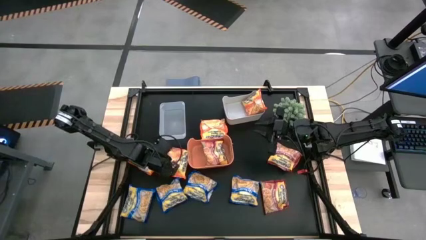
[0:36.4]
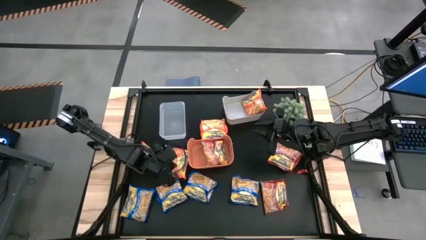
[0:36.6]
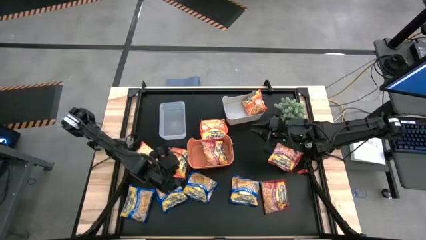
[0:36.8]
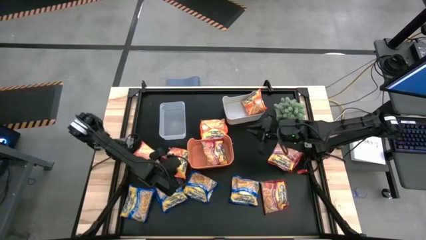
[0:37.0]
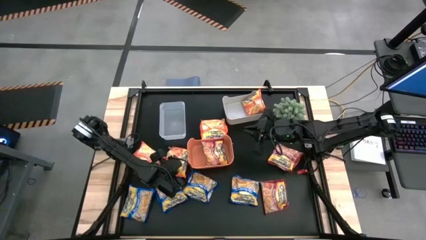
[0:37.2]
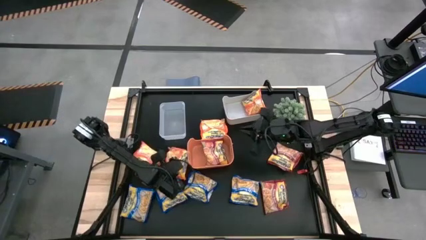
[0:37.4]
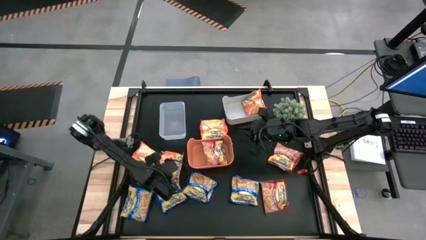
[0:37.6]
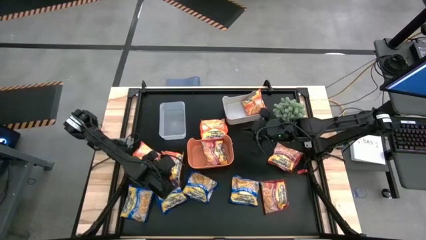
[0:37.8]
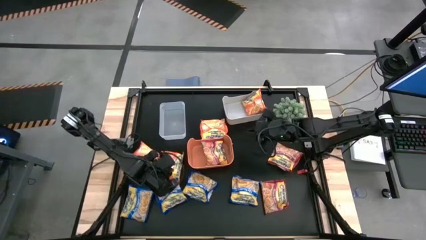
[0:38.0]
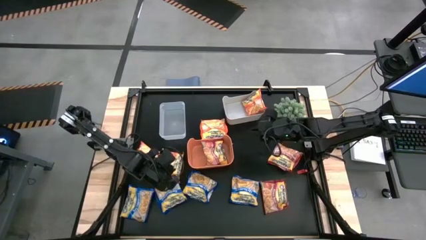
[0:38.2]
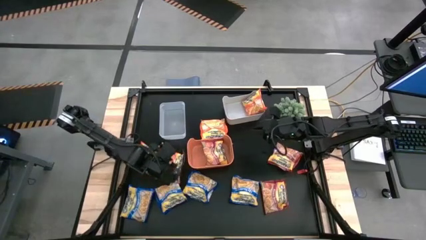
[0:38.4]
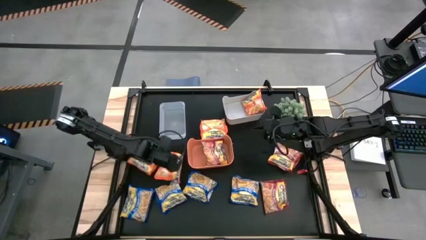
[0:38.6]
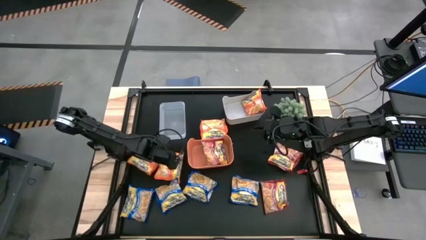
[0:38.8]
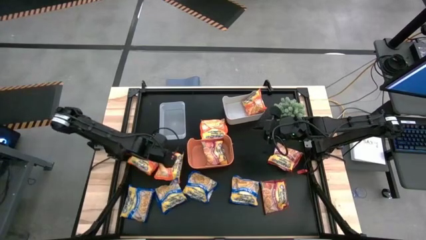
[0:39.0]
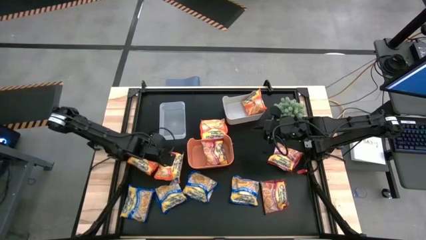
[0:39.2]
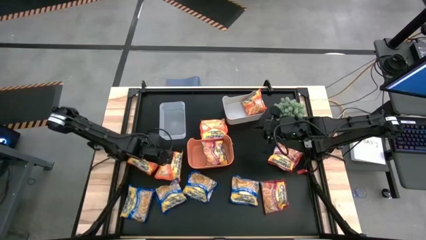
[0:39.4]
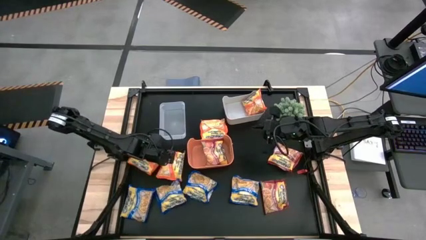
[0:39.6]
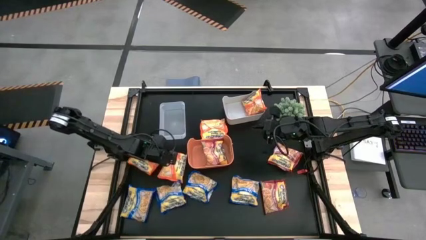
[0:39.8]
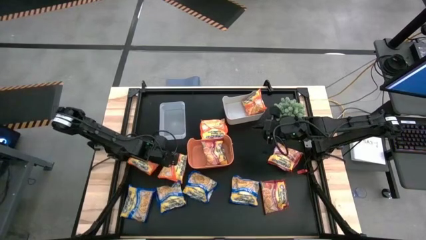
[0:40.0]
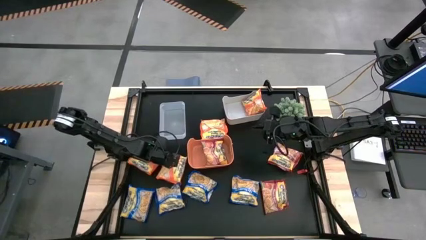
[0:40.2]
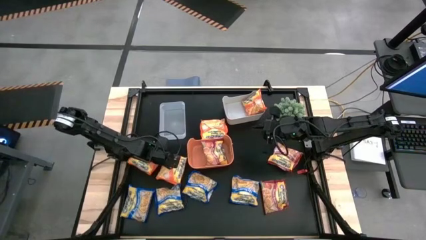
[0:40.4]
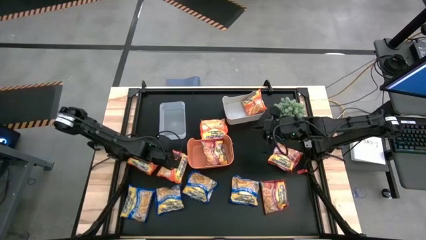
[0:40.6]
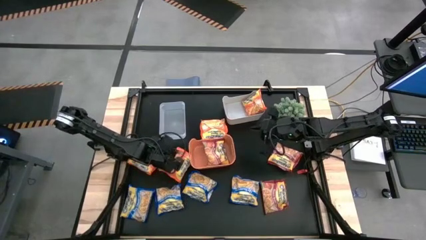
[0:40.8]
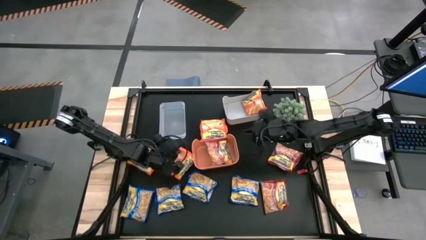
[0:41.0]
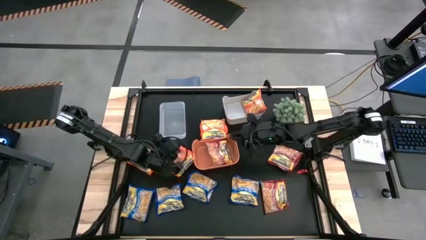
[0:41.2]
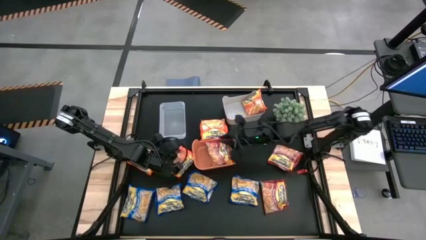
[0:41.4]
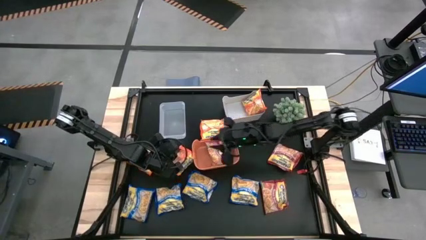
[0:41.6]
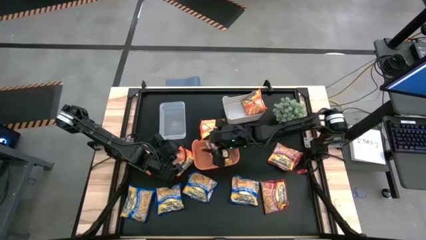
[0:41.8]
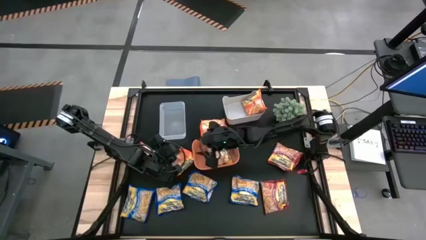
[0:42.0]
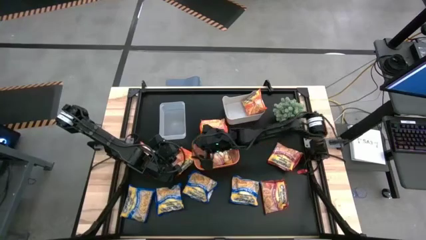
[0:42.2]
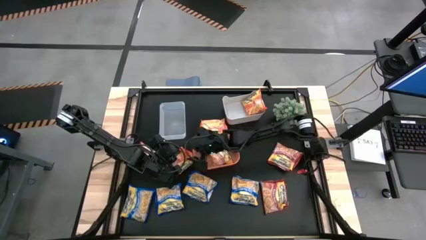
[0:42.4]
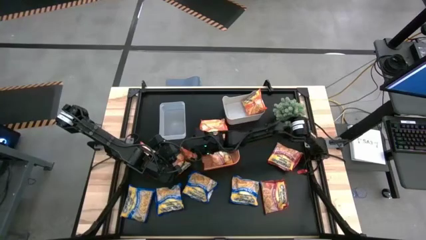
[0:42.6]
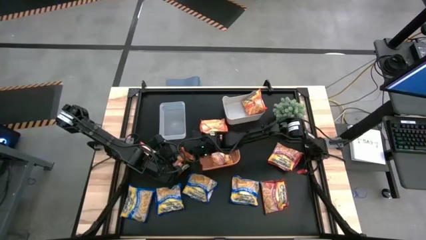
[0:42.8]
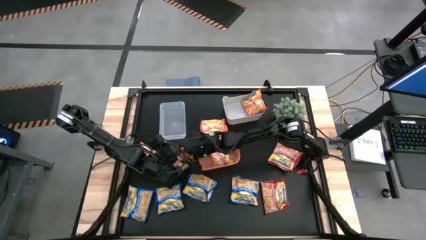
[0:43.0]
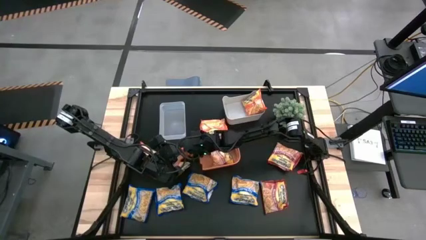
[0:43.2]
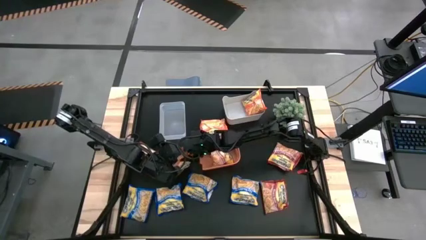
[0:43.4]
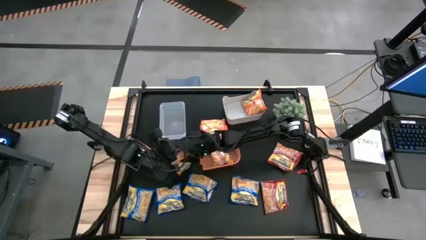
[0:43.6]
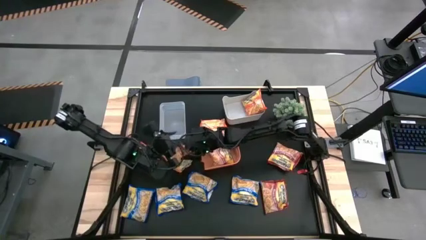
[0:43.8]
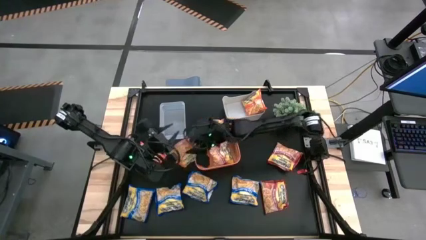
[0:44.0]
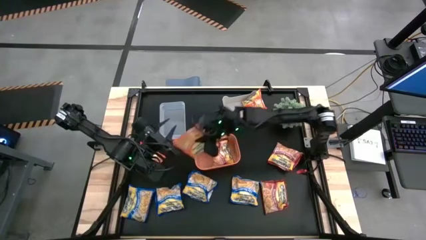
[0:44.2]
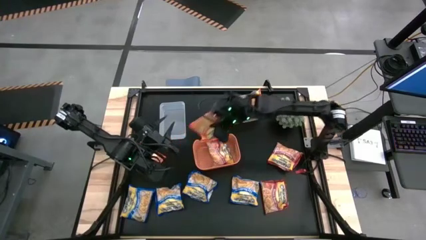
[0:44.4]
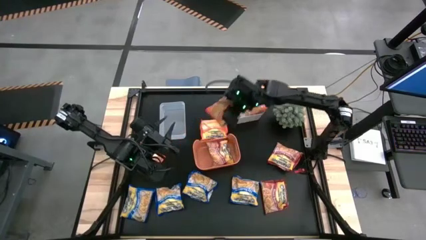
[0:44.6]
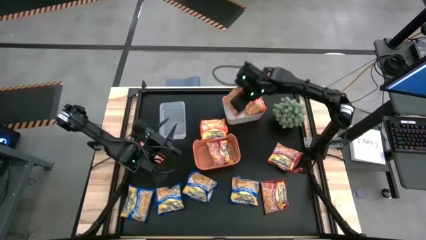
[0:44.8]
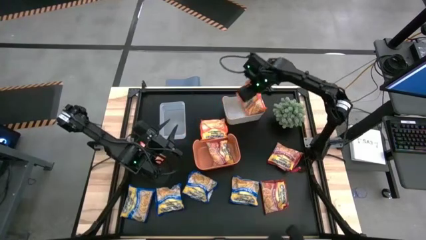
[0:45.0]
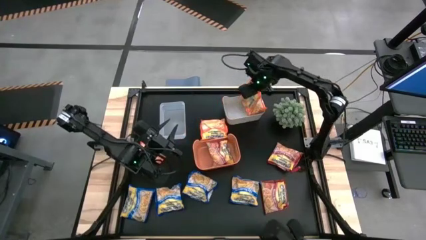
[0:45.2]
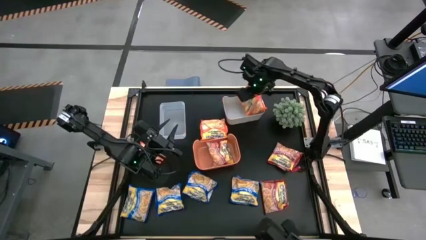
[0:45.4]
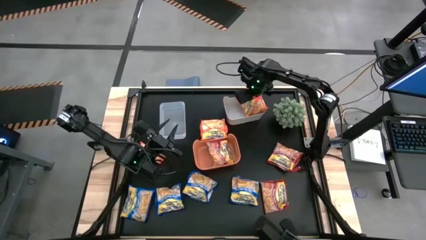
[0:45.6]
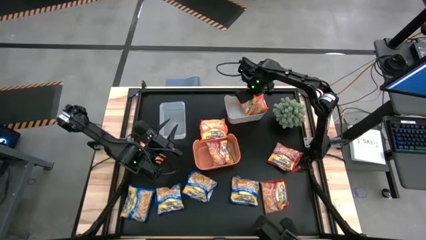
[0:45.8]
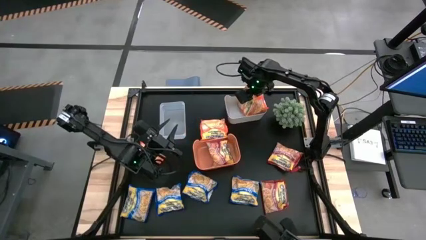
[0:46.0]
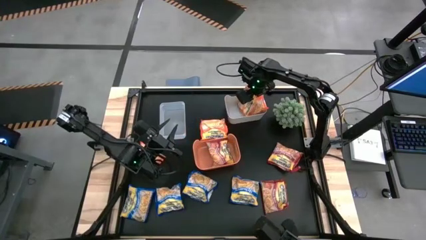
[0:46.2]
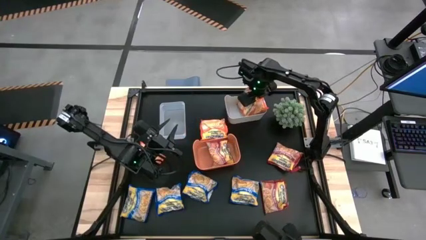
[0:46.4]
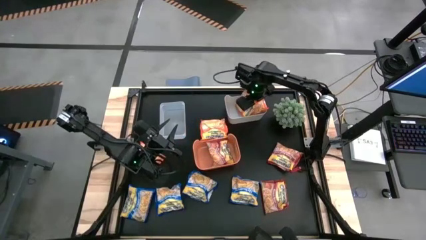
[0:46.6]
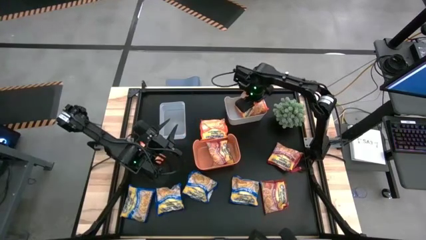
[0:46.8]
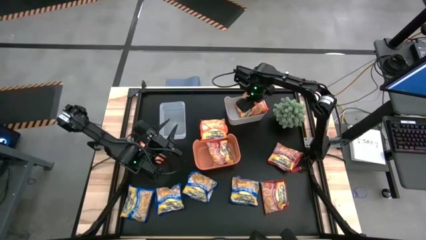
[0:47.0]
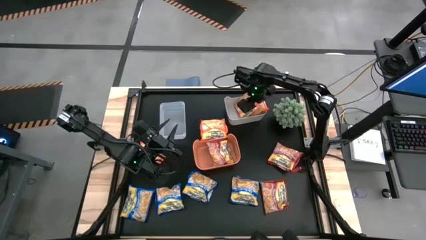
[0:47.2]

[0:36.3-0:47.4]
Task: Sort Maruchan noodles
Put the middle orange noodle packet into the white bin

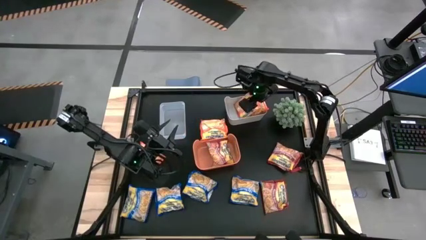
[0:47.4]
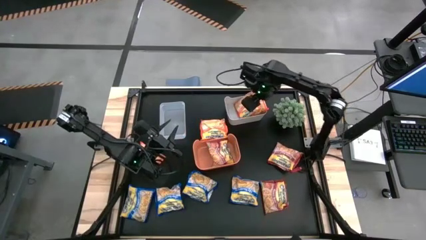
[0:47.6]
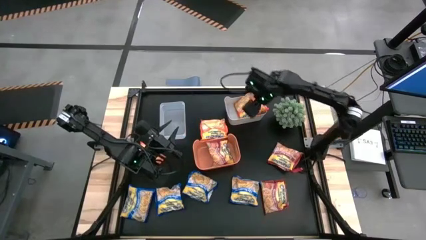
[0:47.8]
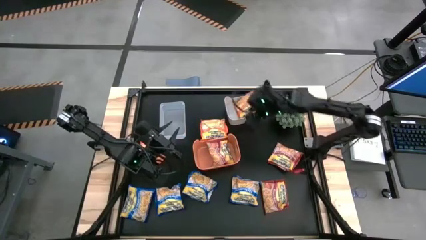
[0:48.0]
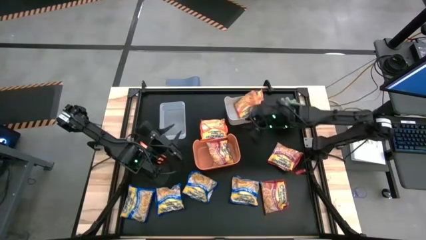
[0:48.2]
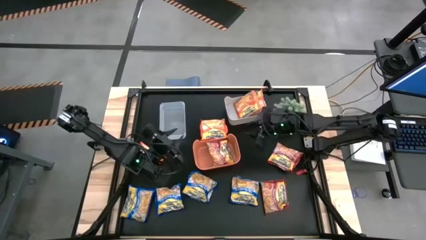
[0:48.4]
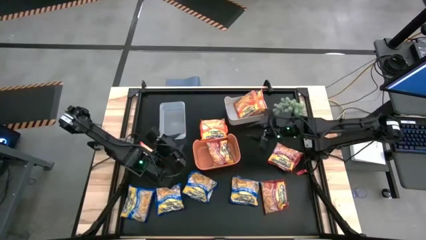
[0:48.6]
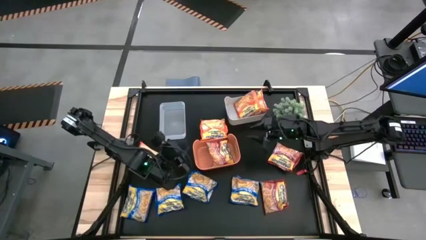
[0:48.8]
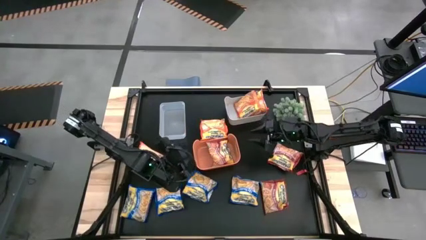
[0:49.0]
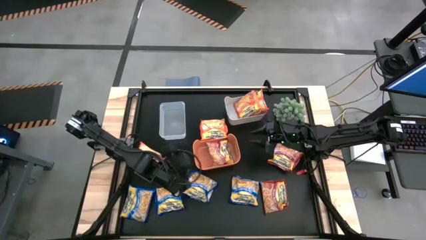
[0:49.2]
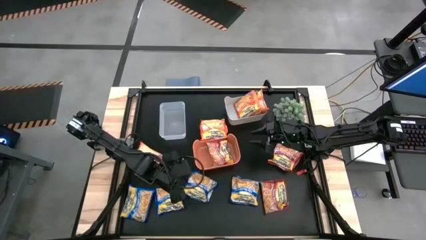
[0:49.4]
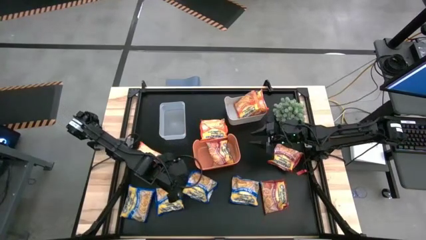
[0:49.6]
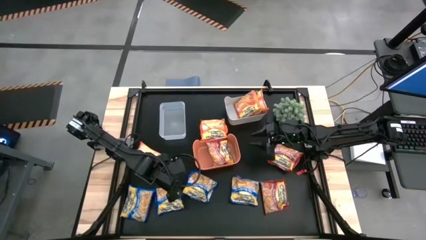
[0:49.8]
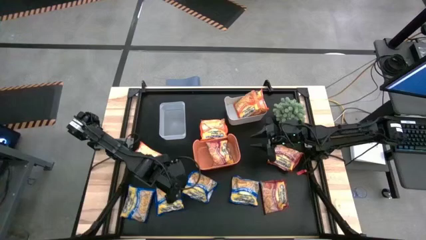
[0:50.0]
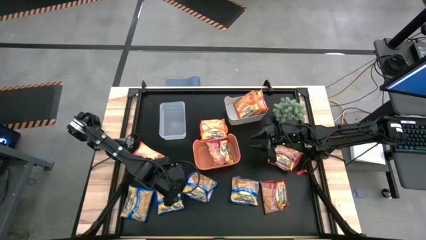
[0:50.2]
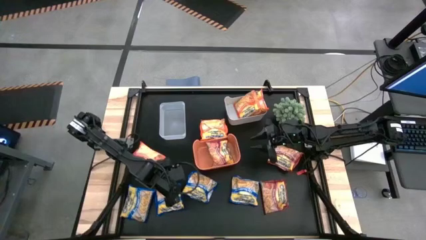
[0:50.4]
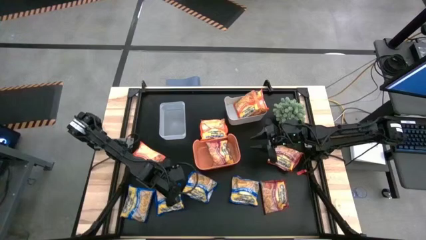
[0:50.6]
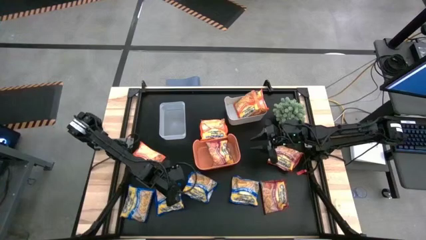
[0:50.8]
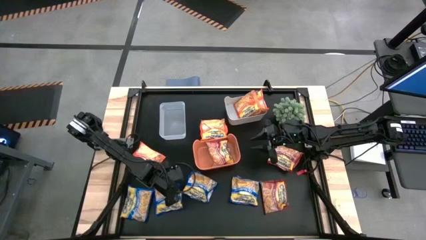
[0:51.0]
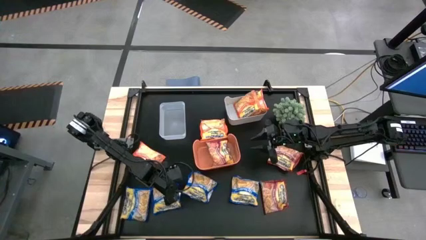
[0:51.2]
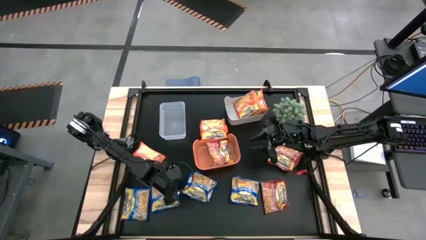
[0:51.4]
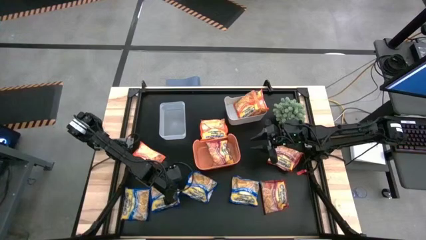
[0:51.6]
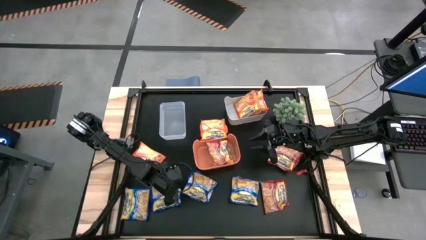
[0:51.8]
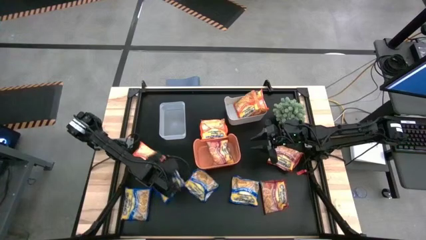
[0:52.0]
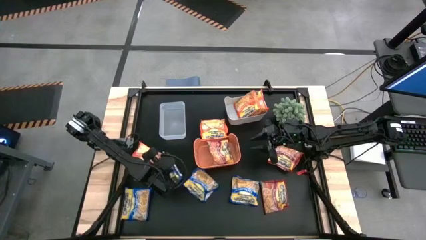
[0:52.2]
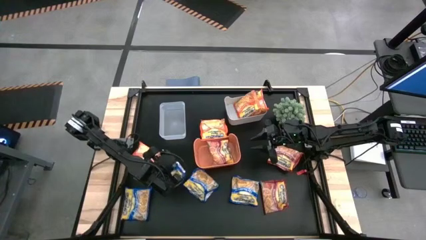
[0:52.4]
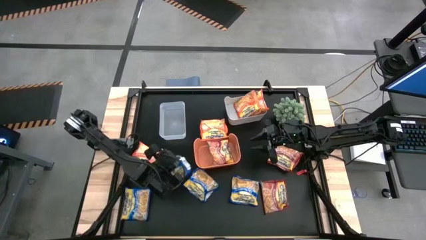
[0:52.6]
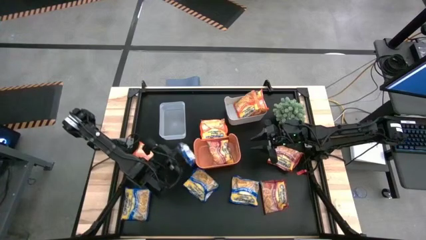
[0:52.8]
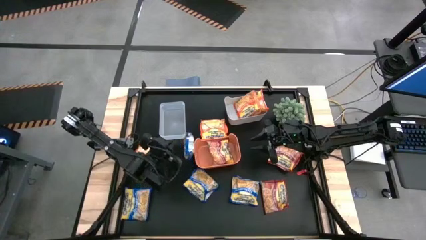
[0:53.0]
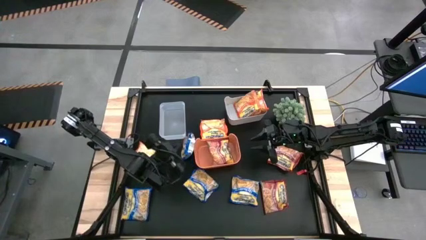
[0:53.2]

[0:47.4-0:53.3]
Put the blue noodle packet into the transparent bin
